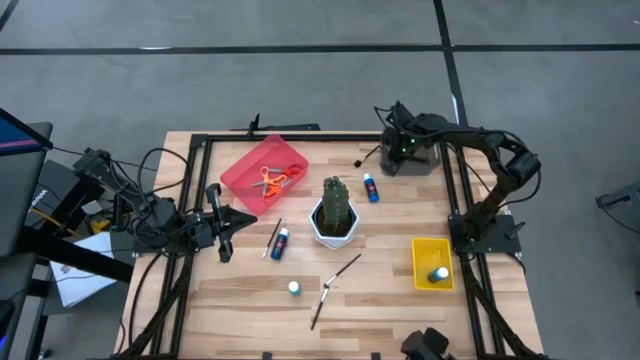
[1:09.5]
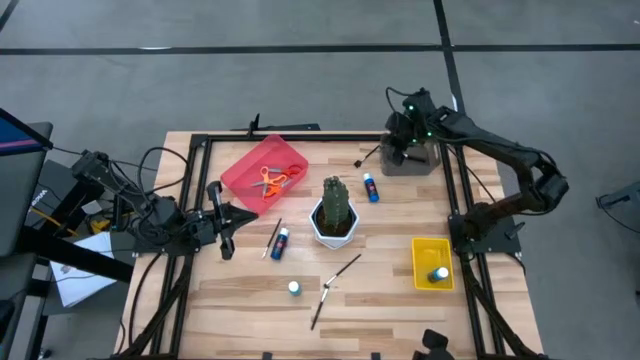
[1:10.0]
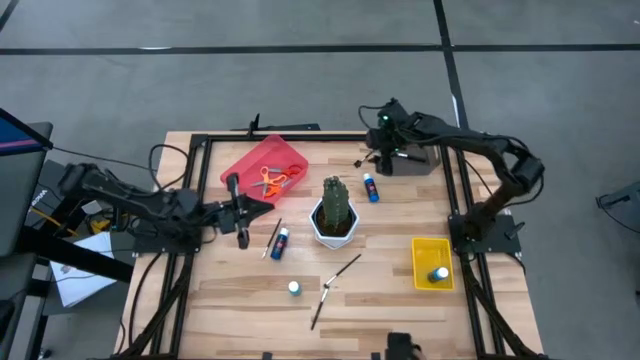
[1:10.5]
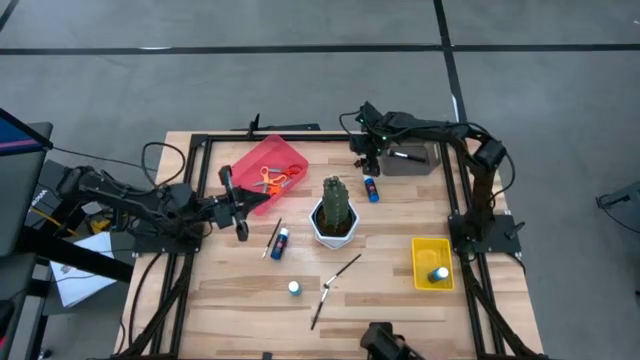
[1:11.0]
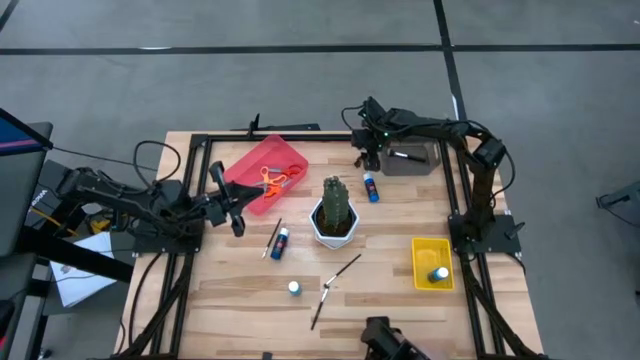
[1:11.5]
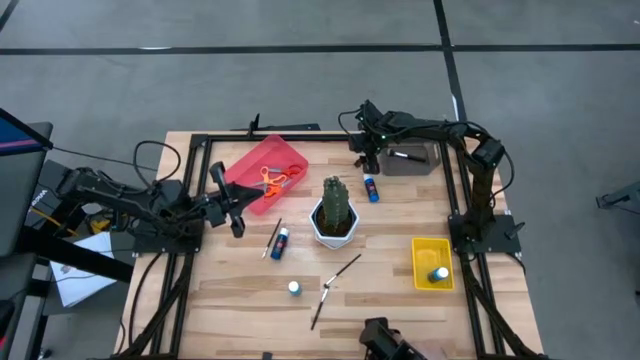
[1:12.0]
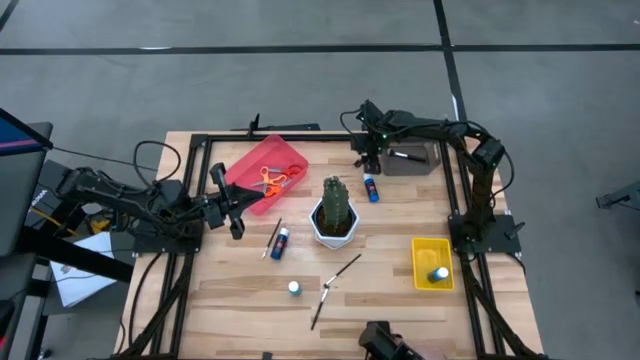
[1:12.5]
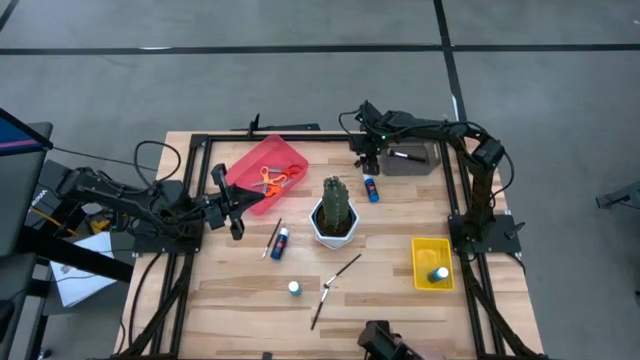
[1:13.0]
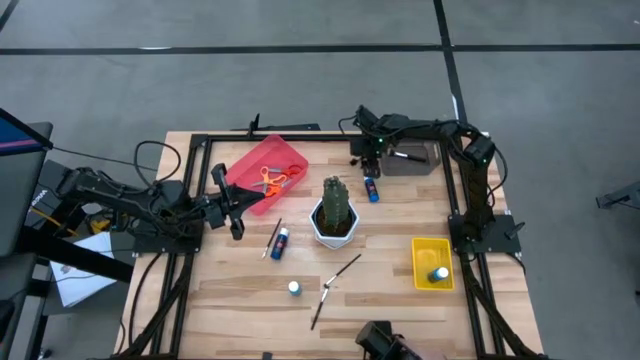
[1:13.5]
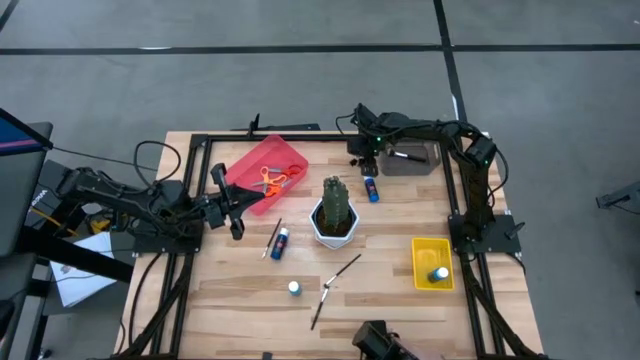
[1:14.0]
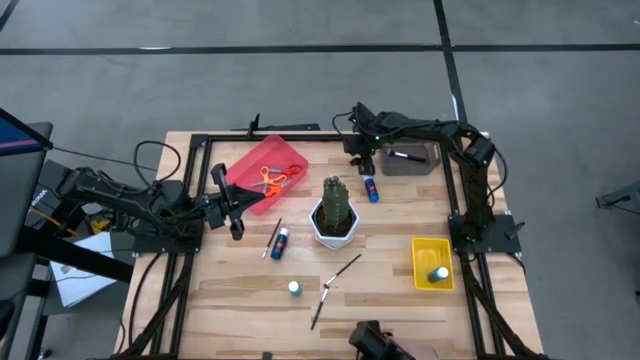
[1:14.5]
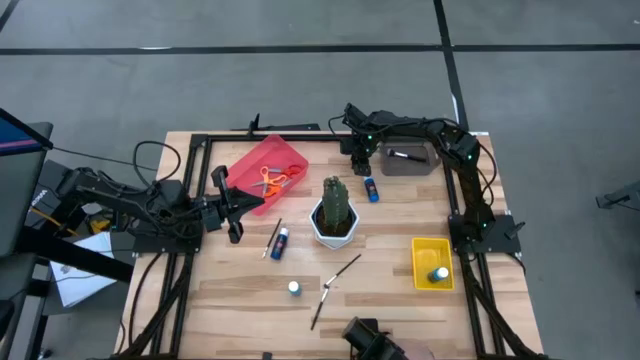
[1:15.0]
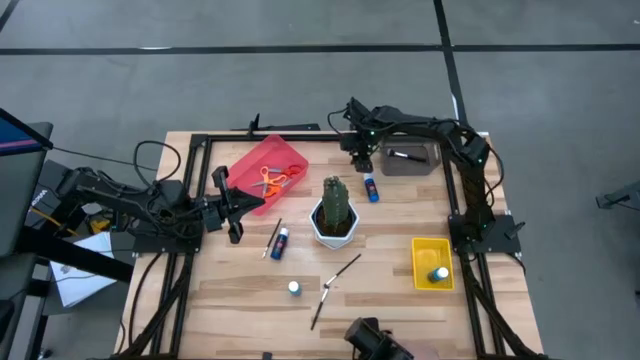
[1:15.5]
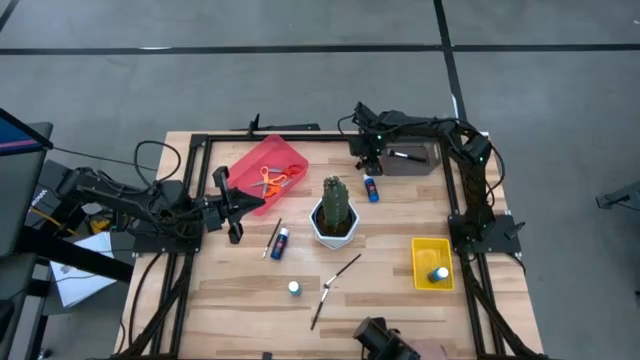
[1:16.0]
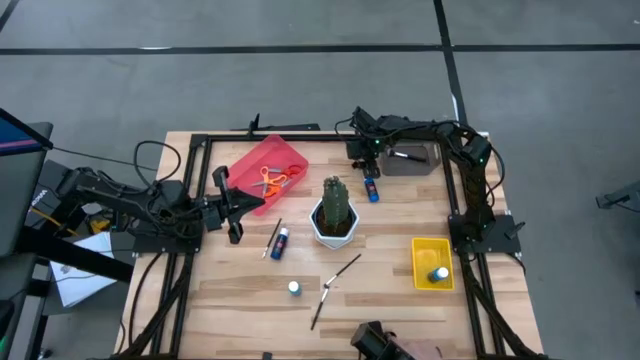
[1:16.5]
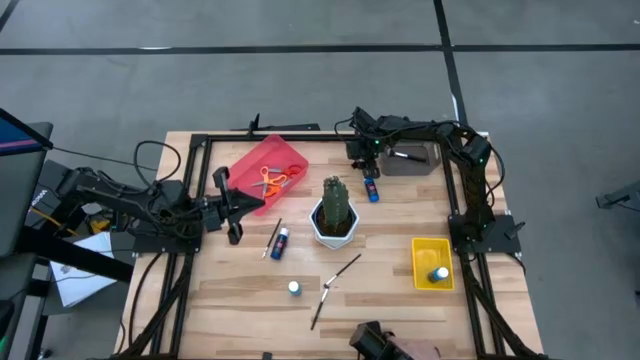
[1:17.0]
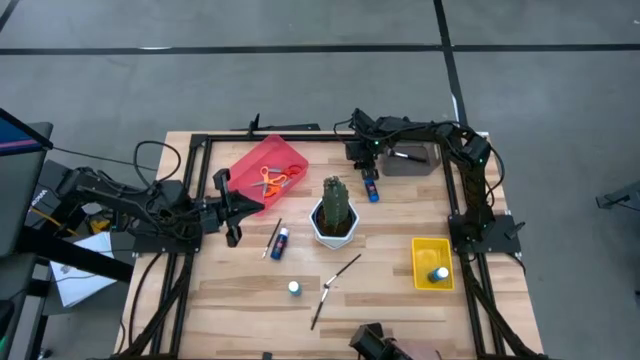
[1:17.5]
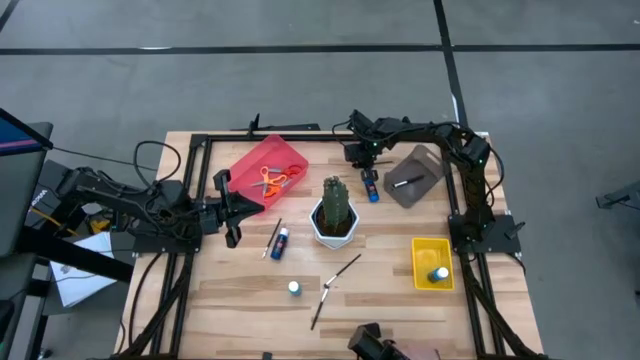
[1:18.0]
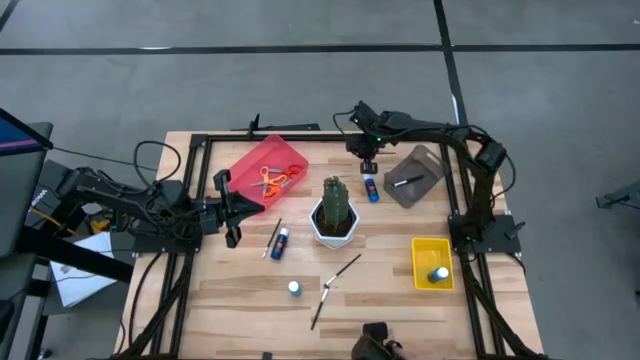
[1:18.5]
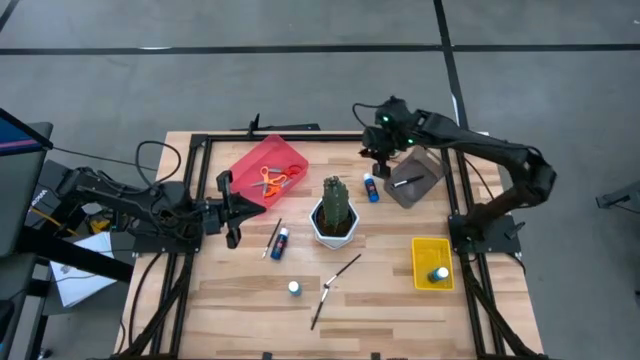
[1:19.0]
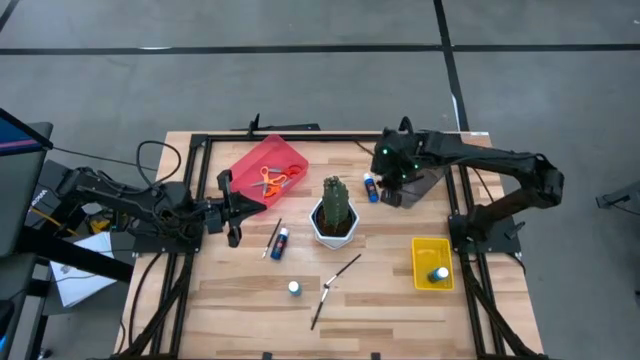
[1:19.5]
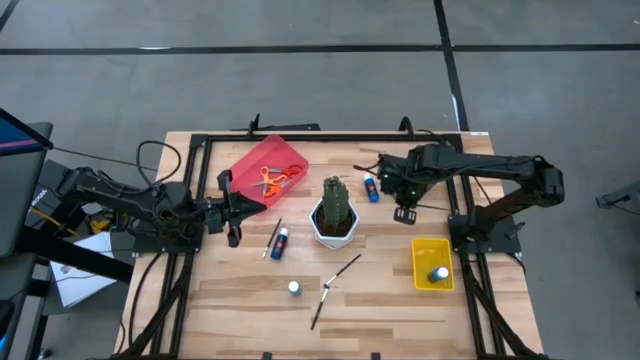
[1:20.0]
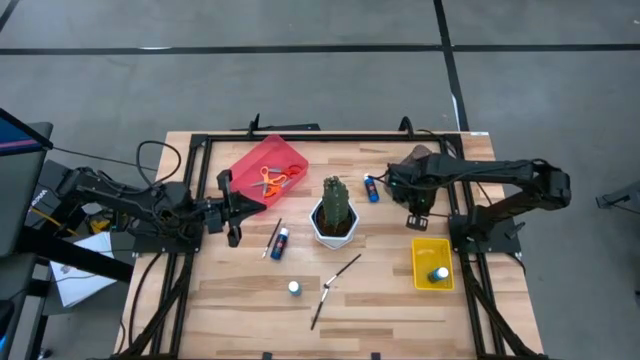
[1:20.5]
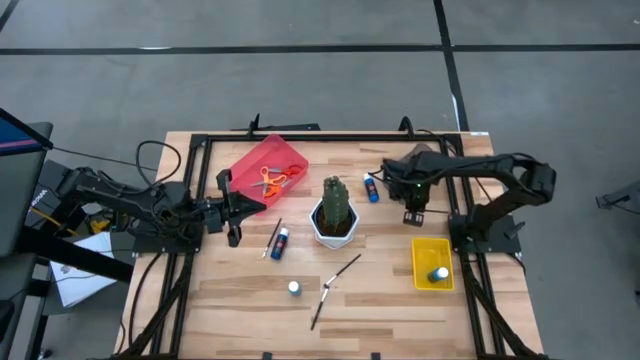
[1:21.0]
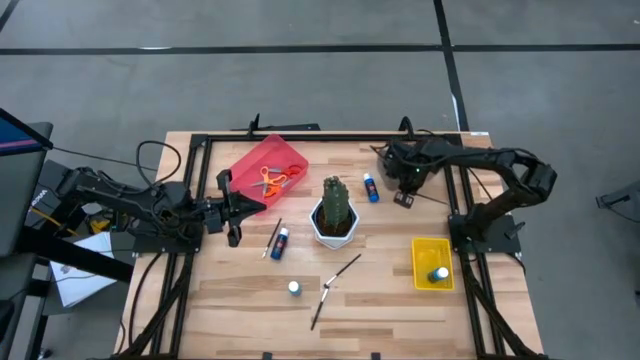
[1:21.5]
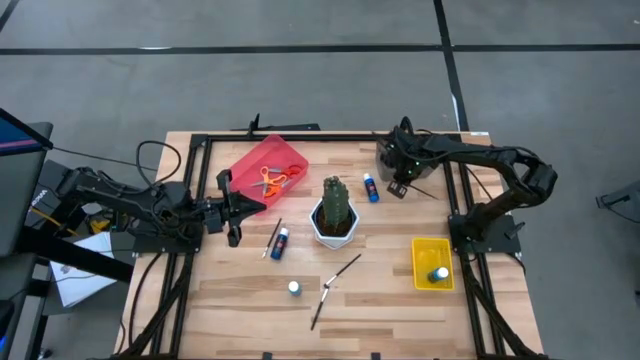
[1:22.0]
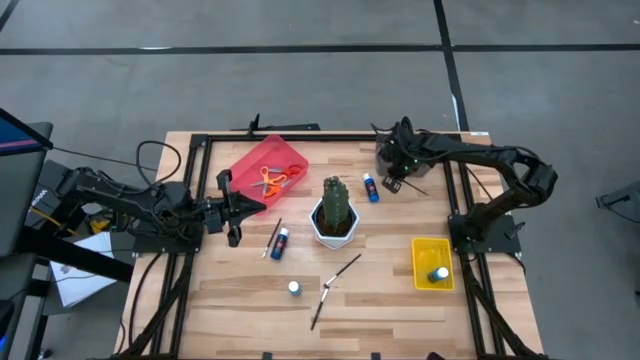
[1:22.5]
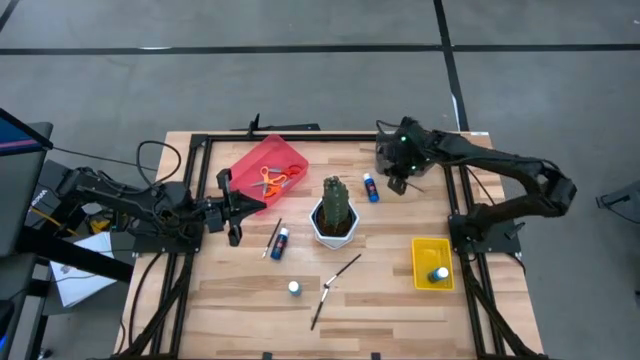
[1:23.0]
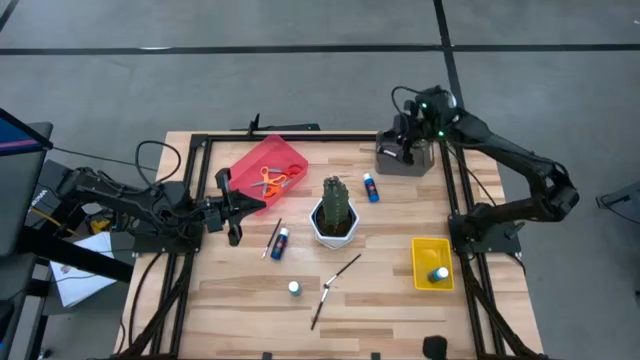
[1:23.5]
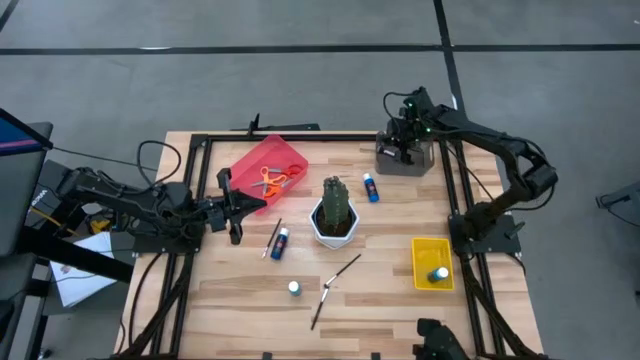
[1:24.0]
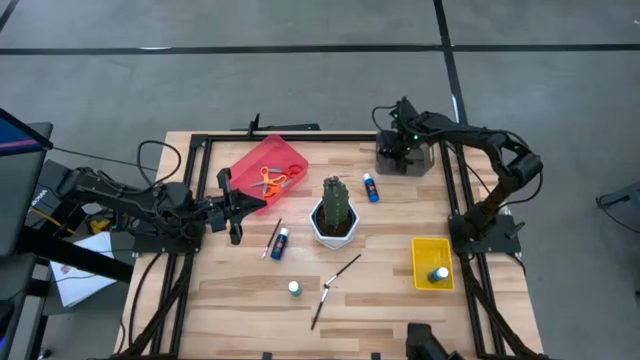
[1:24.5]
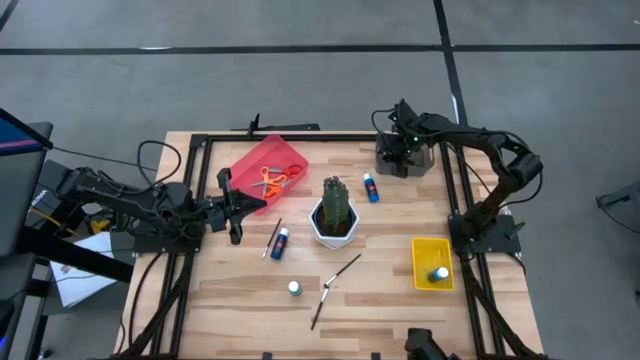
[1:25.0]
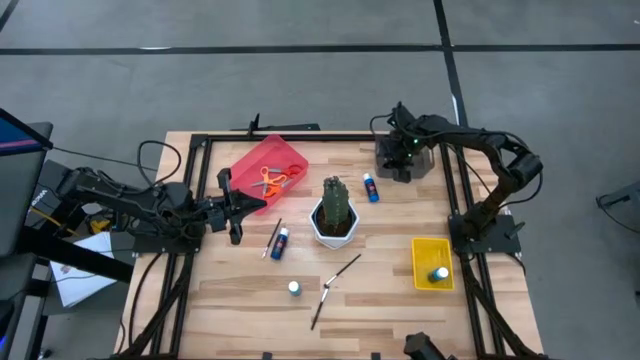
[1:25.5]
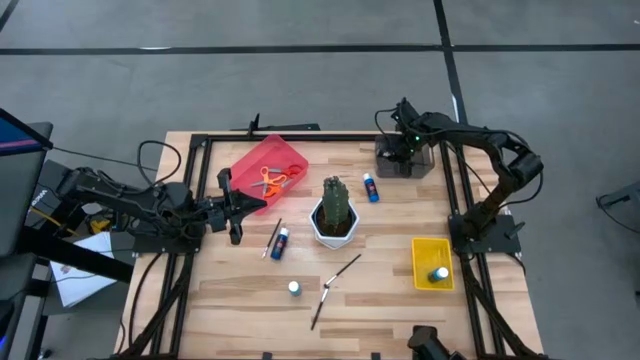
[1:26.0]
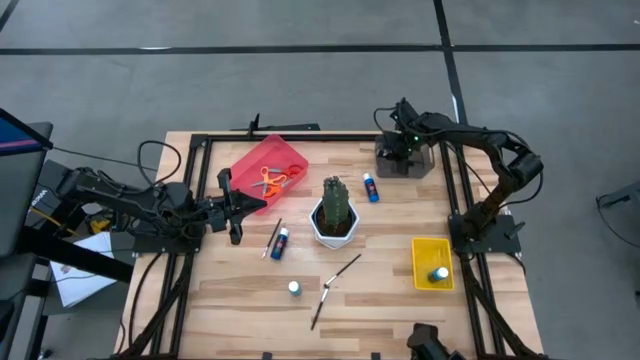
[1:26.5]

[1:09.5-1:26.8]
Task: Pick & Place Paint Supplies
Put the lash into the black bin

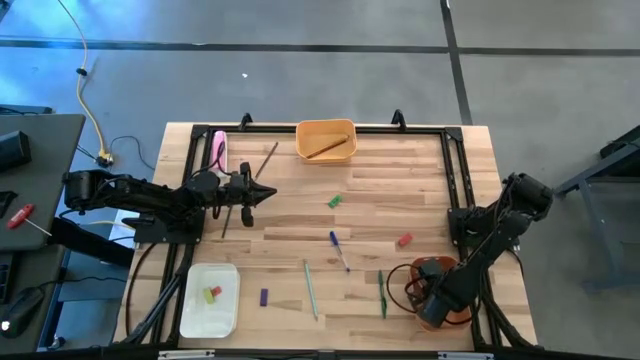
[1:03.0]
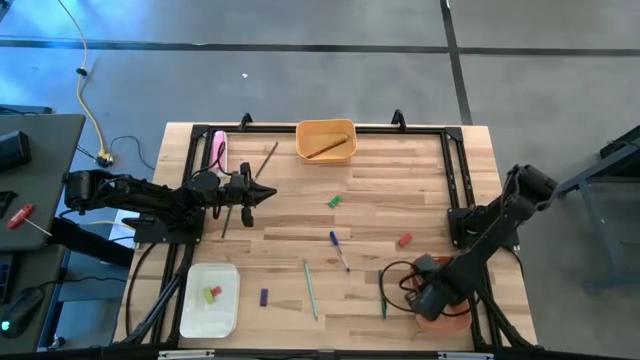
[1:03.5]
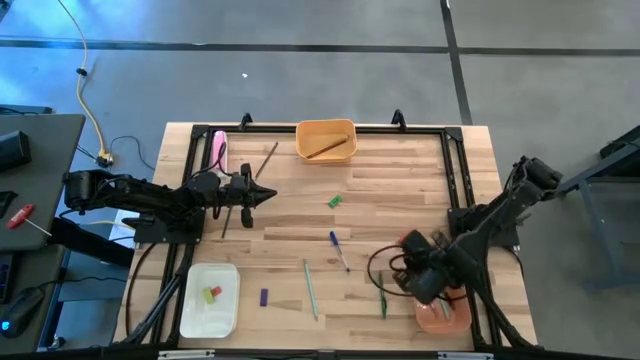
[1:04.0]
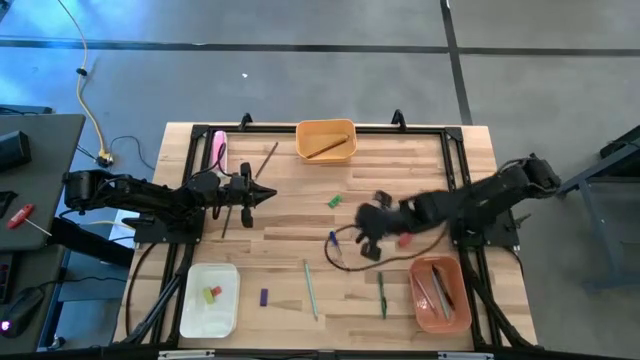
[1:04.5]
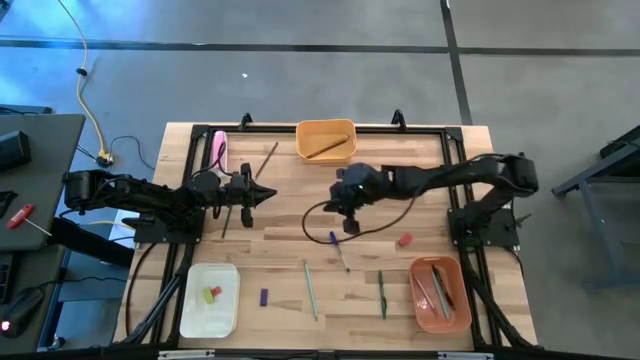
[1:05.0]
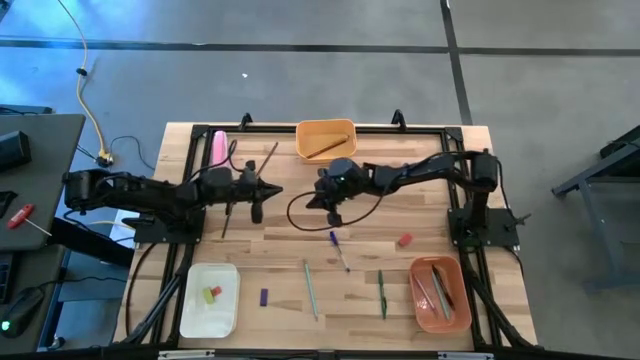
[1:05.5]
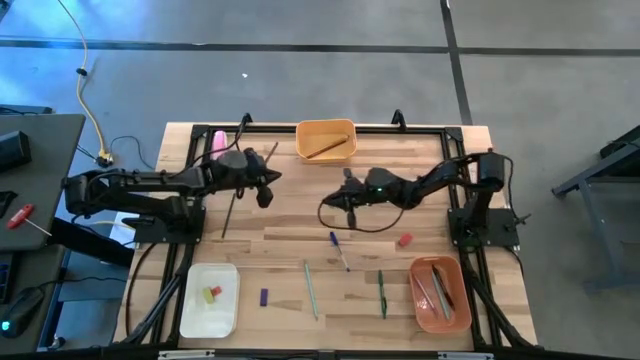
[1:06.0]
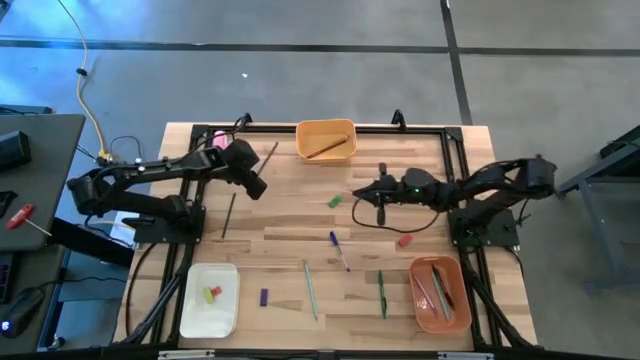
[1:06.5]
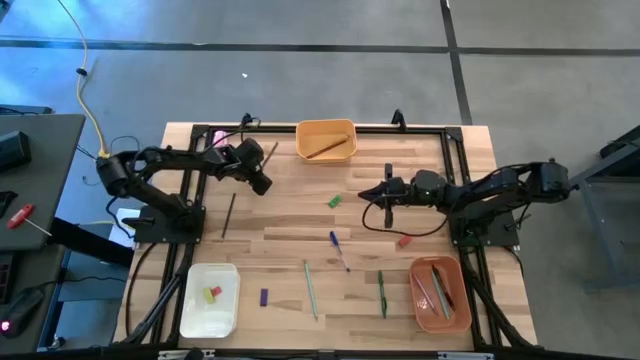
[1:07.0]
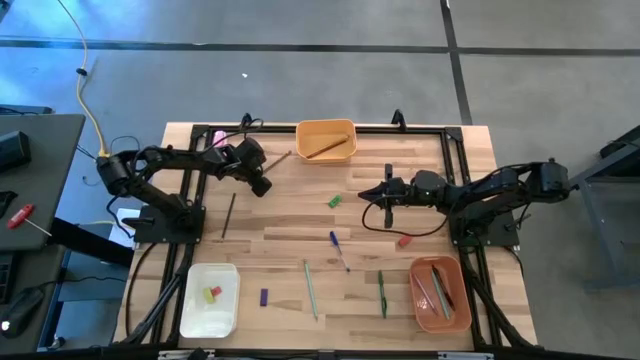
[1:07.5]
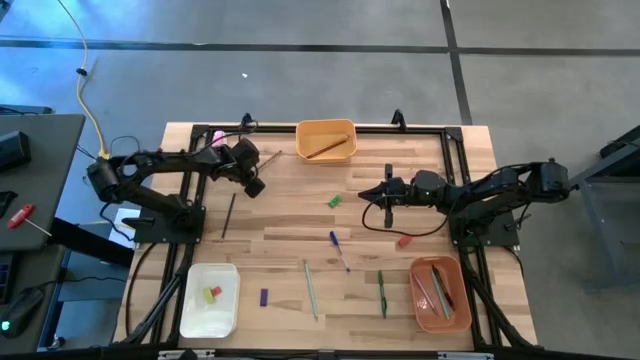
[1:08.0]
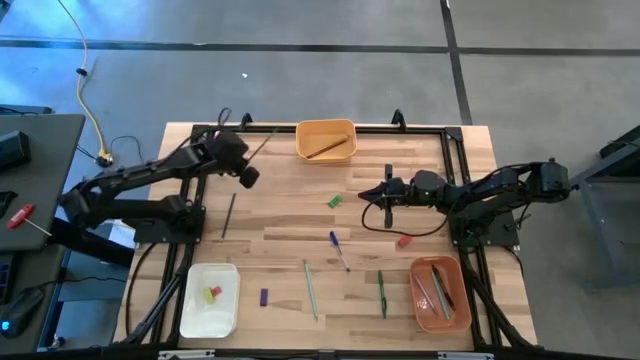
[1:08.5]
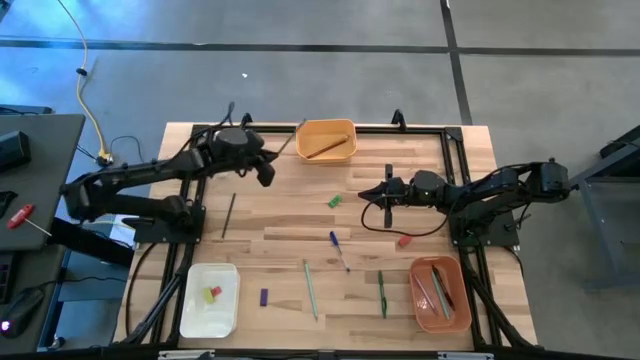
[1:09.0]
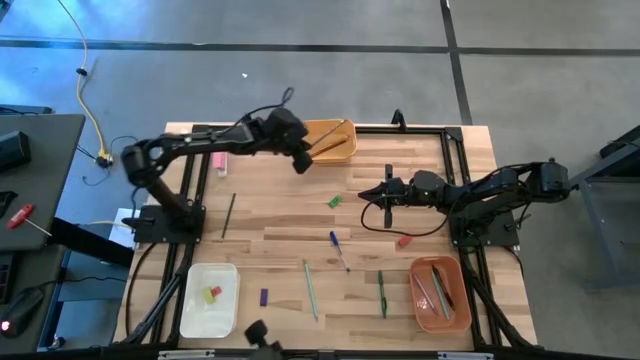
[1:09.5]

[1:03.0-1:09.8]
Task: Sort crayons/erasers/pens/pencils in bins
Put the dark blue pencil into the yellow bin
